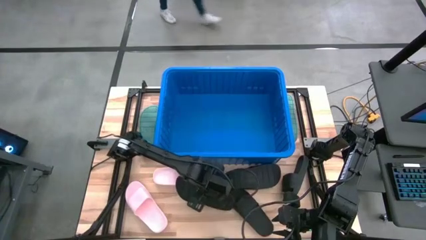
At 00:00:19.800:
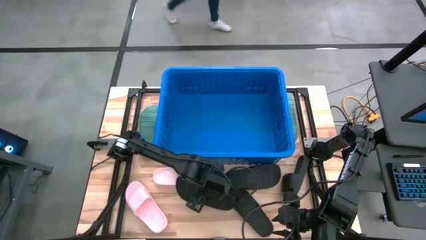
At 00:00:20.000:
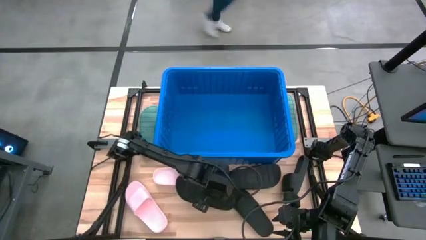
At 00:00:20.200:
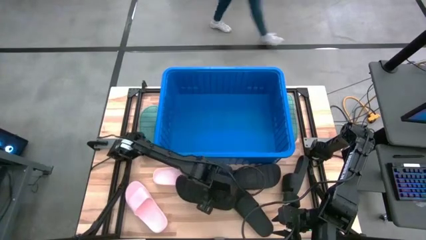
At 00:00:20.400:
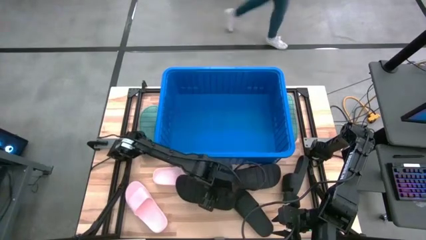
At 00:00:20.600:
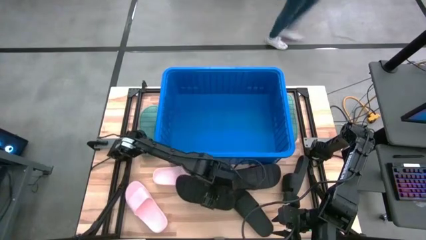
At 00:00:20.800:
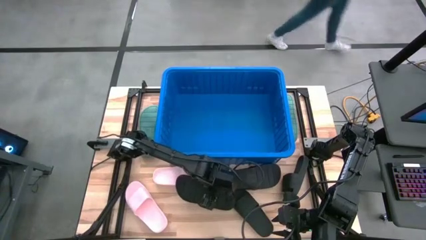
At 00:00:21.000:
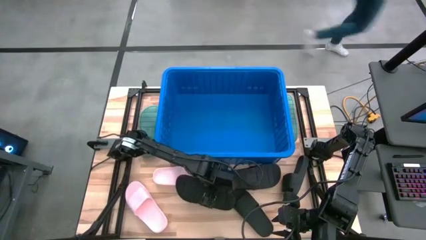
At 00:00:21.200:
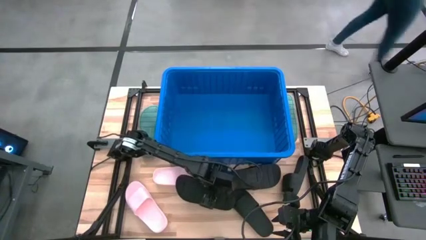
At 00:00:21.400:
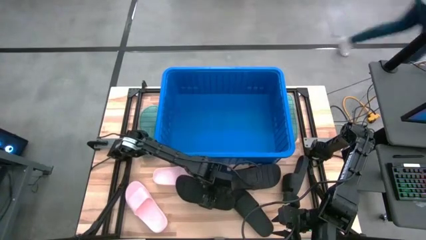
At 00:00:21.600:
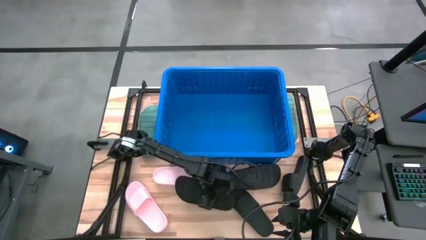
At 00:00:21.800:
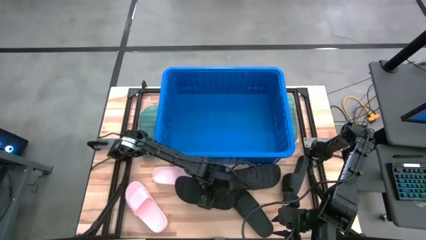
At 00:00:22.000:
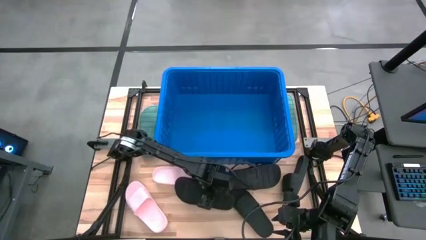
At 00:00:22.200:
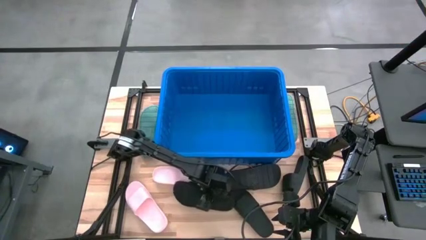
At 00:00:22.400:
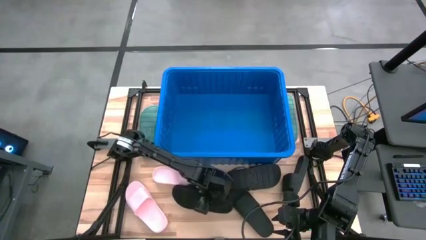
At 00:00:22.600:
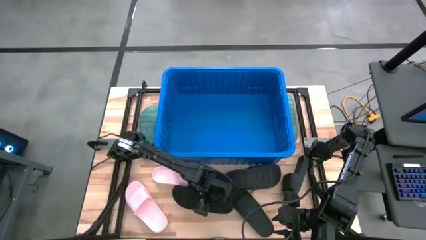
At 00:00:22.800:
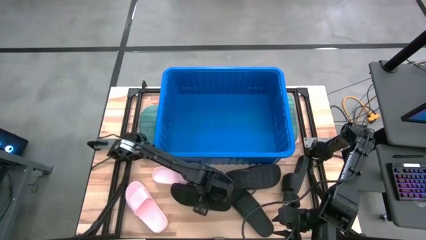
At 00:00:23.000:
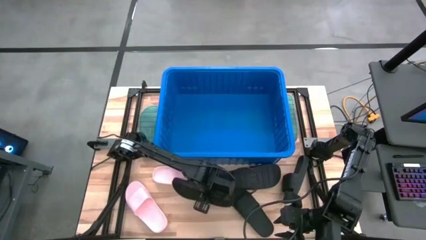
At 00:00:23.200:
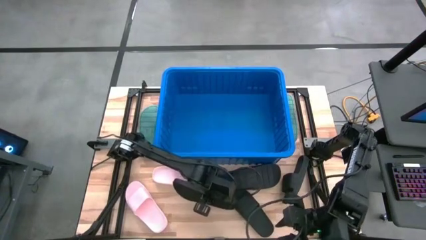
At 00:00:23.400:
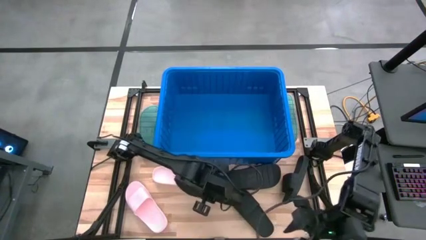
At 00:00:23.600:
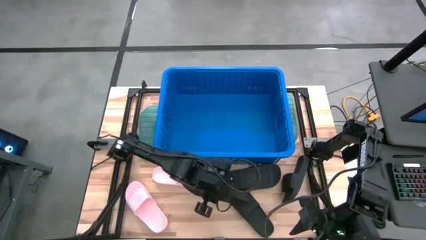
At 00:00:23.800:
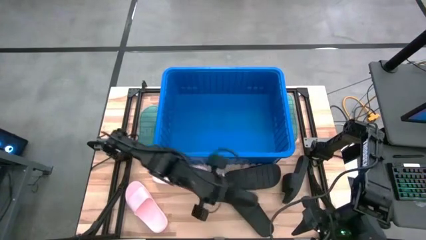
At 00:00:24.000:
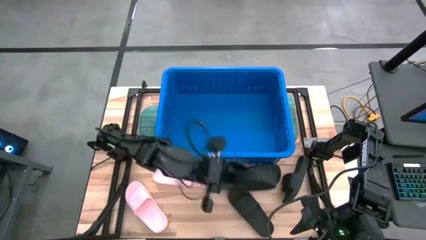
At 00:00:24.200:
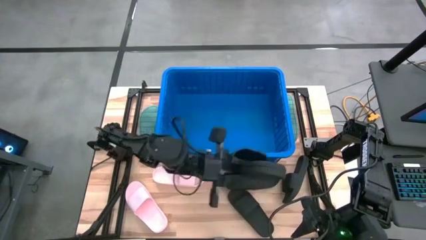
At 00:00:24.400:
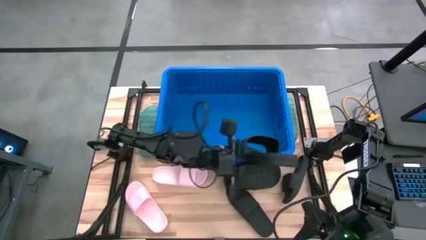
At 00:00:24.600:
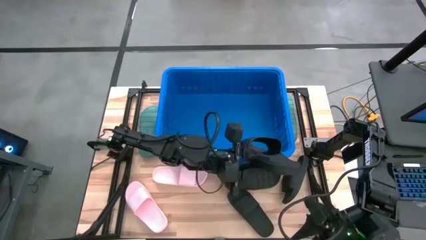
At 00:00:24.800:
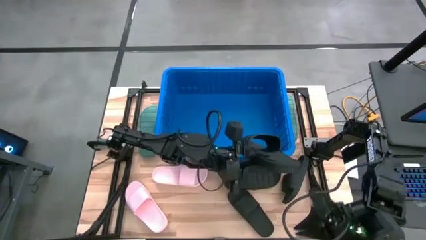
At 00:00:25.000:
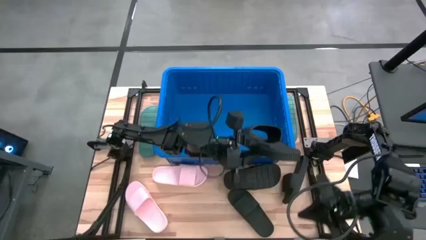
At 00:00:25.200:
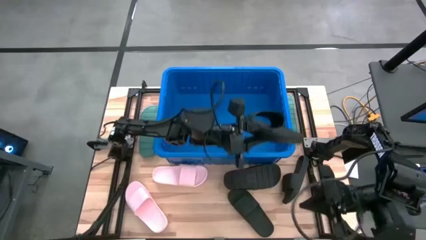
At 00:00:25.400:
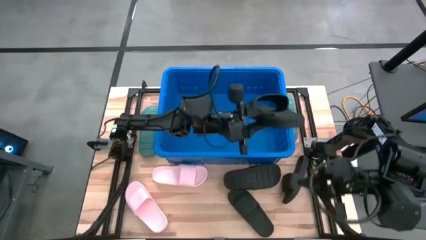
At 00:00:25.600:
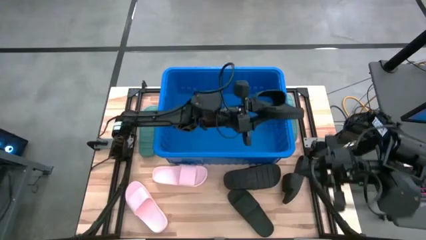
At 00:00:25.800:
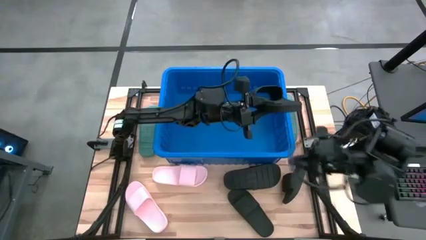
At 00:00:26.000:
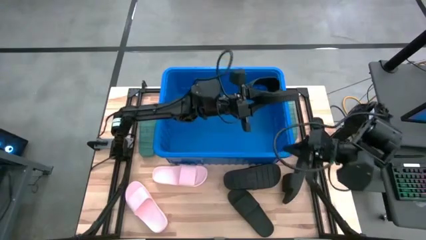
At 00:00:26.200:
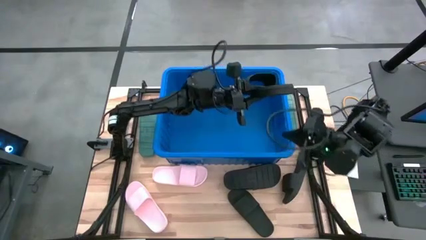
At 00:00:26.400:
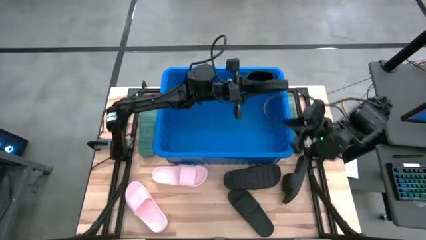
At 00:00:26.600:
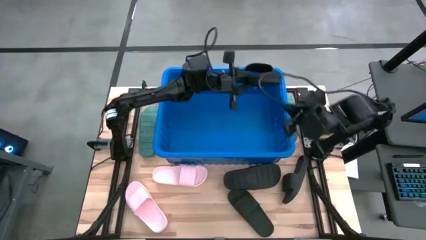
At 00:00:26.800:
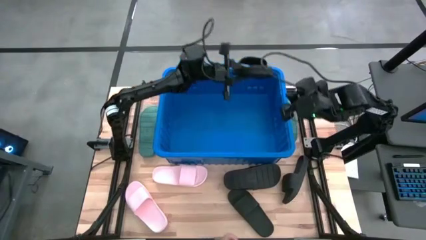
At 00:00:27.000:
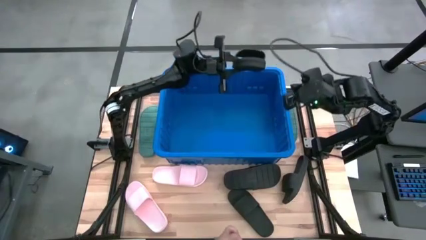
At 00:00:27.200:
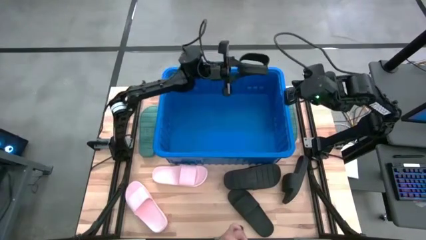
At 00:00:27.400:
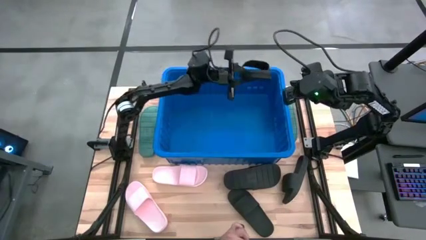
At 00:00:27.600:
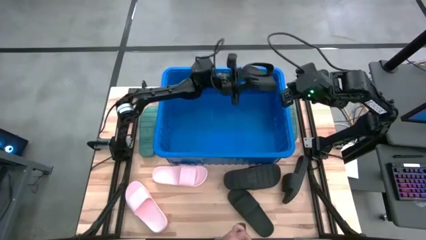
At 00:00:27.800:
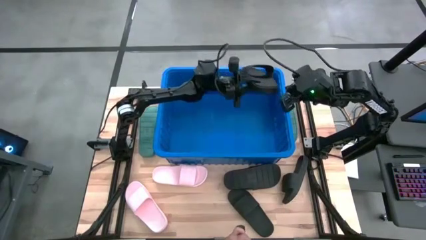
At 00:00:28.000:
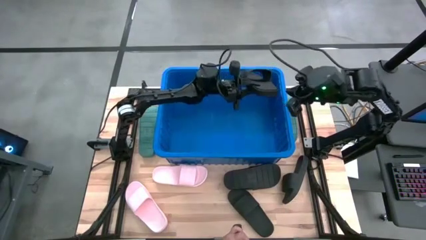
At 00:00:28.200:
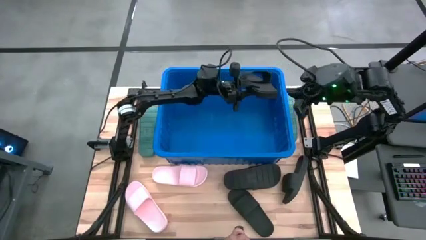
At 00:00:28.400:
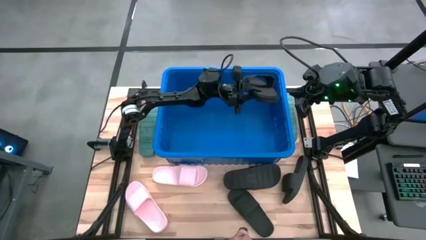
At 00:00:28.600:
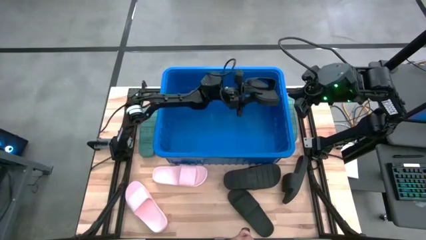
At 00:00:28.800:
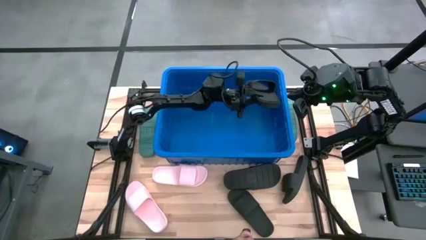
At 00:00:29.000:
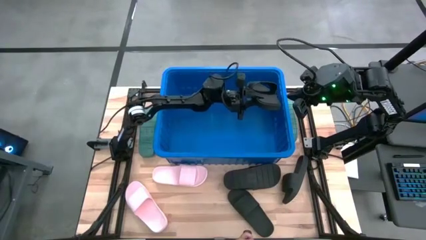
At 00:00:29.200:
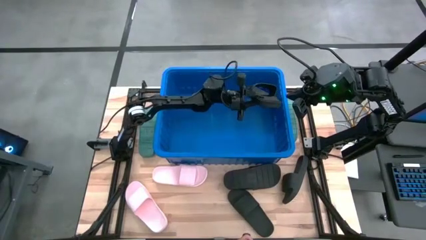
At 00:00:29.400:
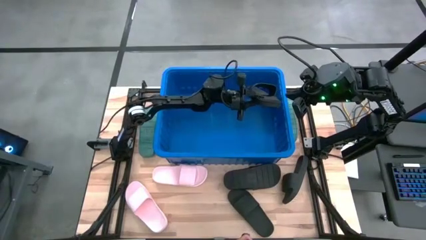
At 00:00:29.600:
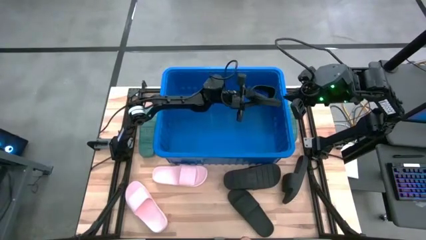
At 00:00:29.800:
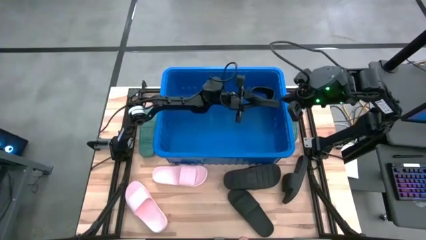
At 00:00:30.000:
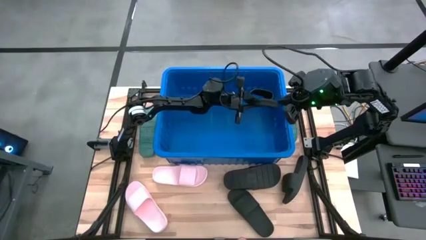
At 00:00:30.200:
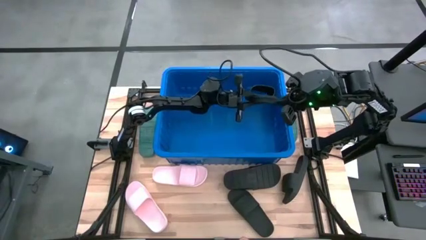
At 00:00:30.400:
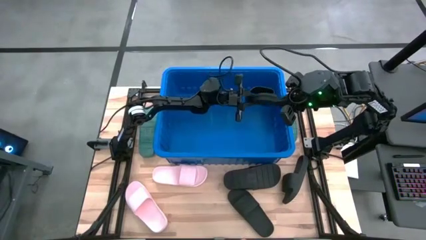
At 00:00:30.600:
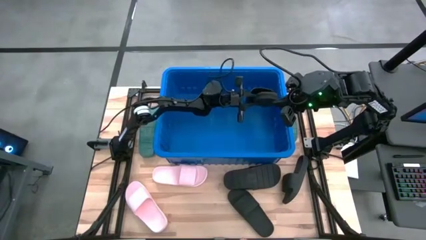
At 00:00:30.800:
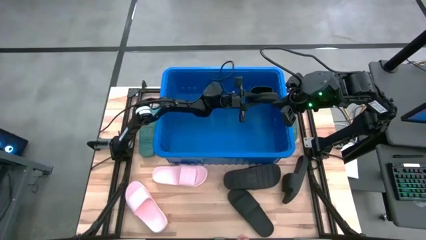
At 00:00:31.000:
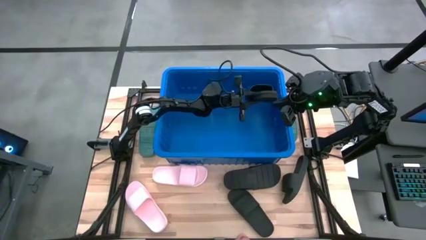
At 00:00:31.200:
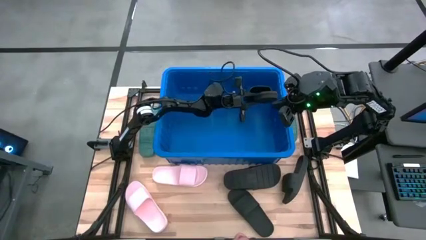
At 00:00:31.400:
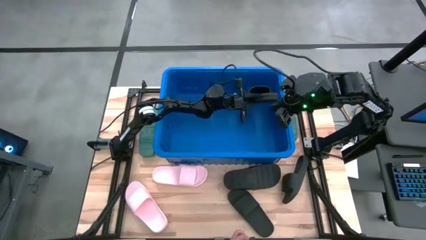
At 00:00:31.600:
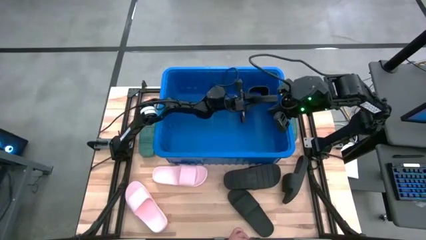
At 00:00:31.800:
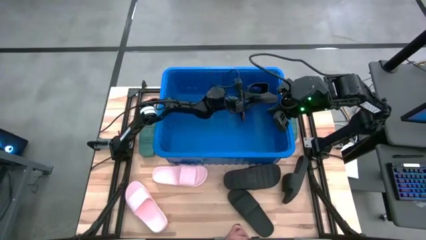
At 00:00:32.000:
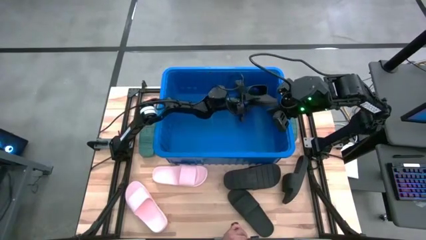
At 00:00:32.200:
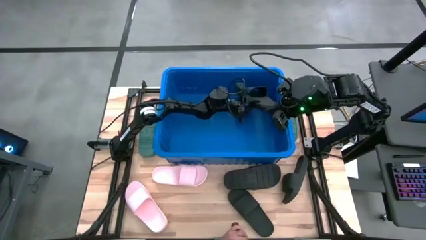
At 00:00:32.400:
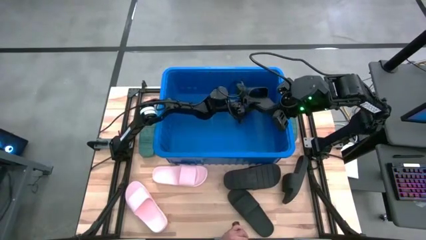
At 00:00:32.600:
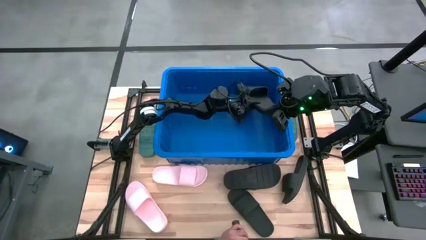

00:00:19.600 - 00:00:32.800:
Task: Pick and place slides into bin
Put the black slipper into the blue bin
